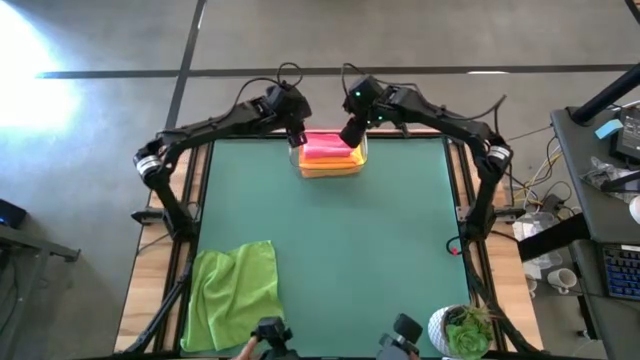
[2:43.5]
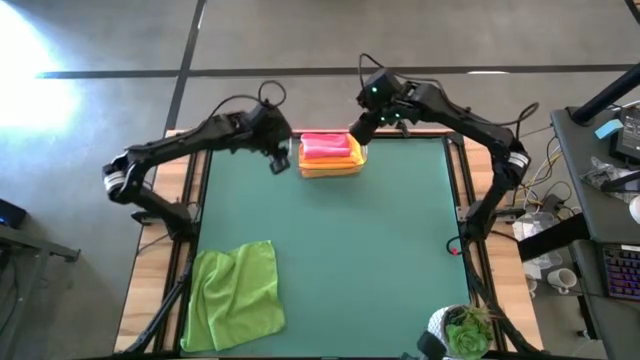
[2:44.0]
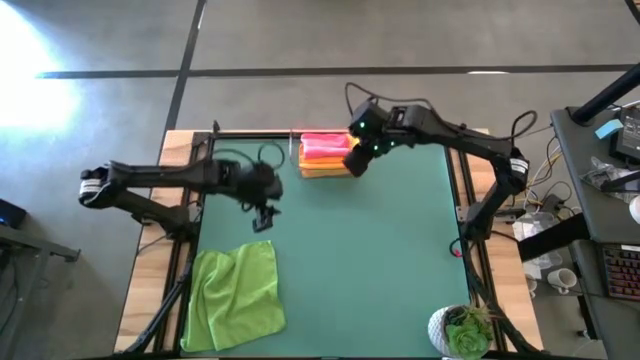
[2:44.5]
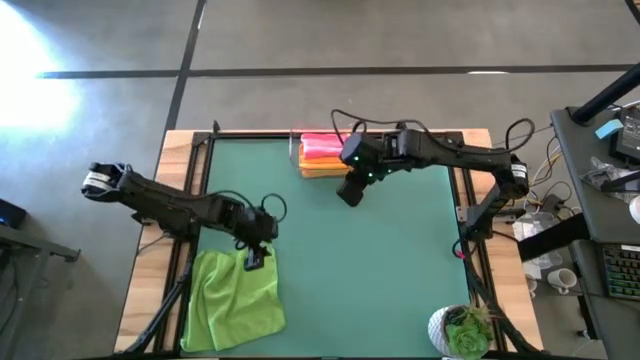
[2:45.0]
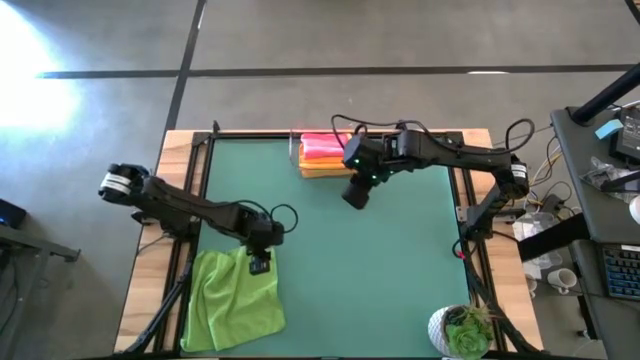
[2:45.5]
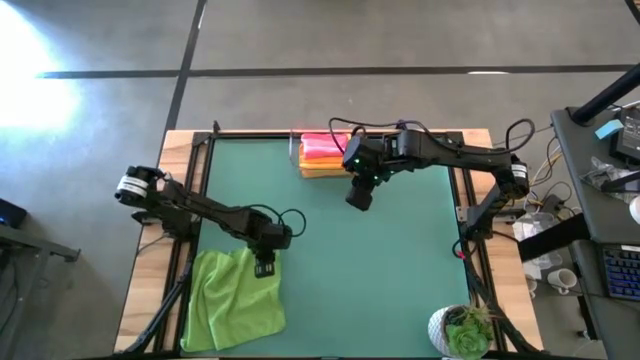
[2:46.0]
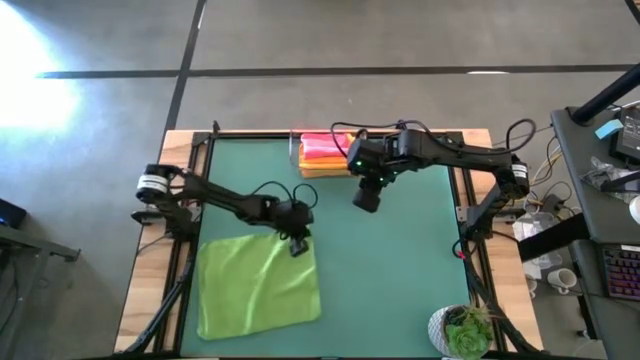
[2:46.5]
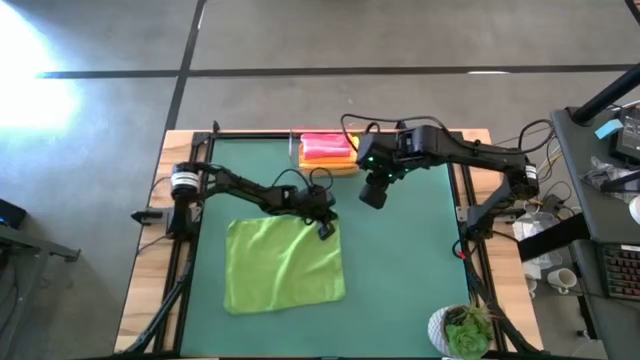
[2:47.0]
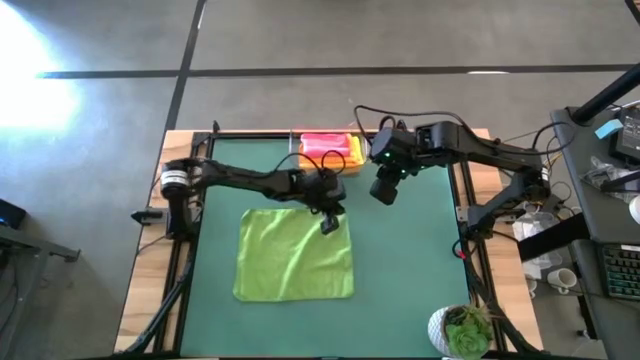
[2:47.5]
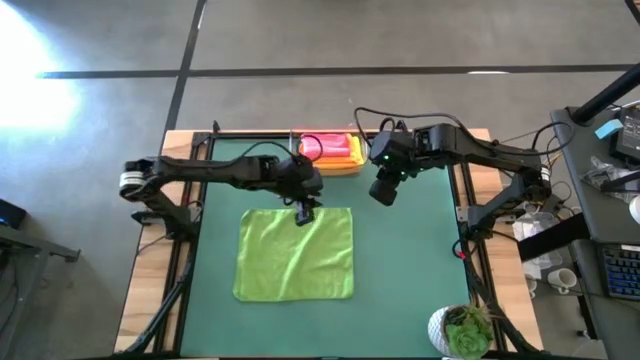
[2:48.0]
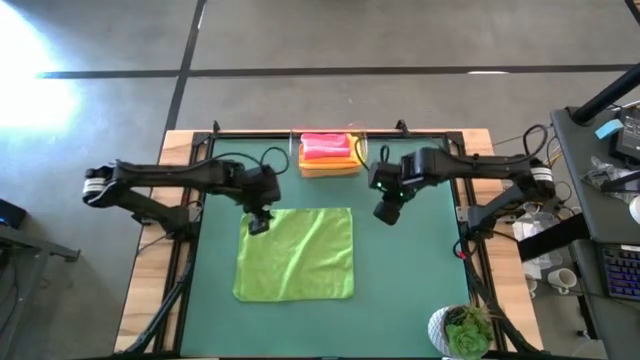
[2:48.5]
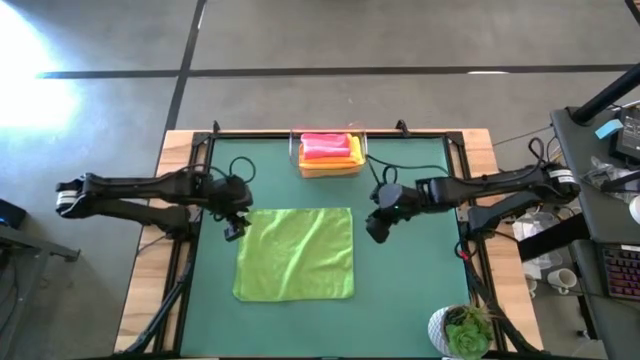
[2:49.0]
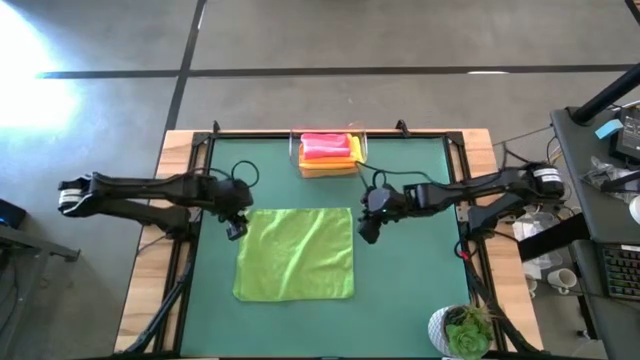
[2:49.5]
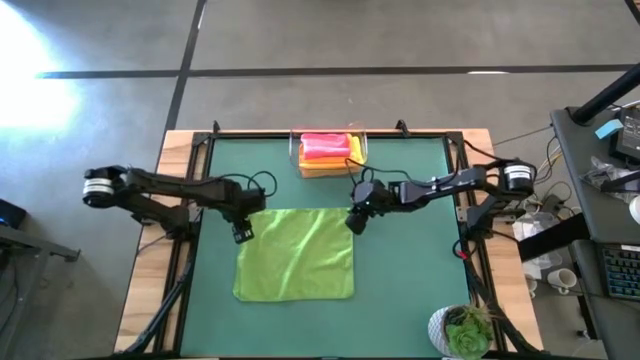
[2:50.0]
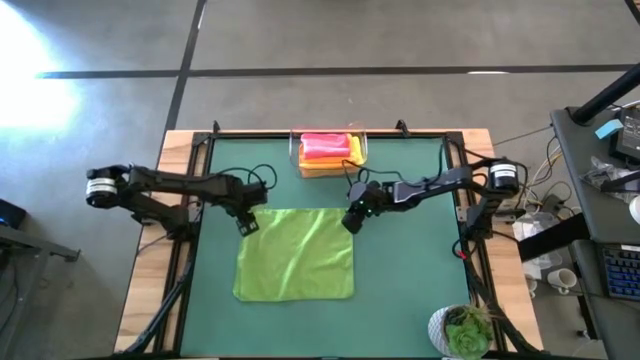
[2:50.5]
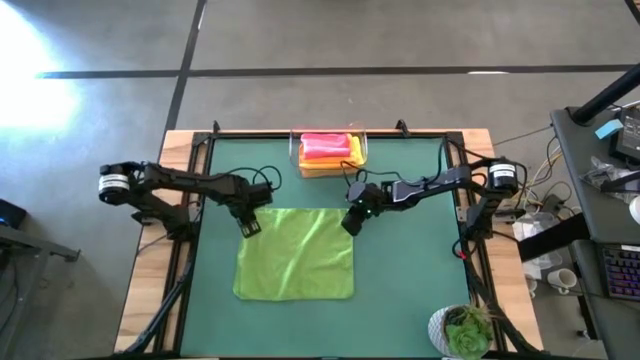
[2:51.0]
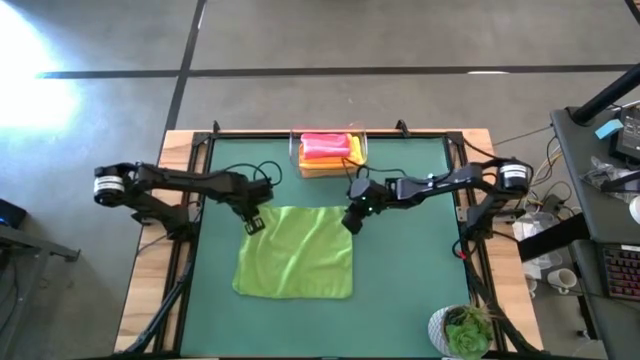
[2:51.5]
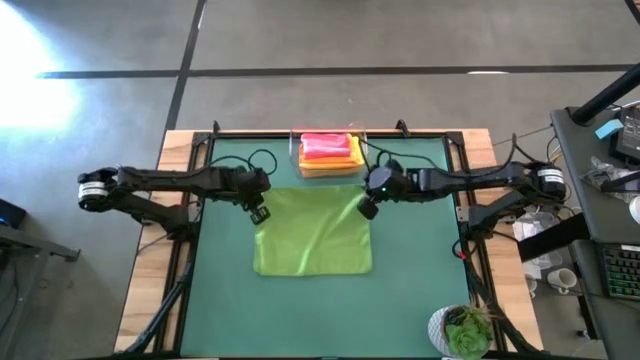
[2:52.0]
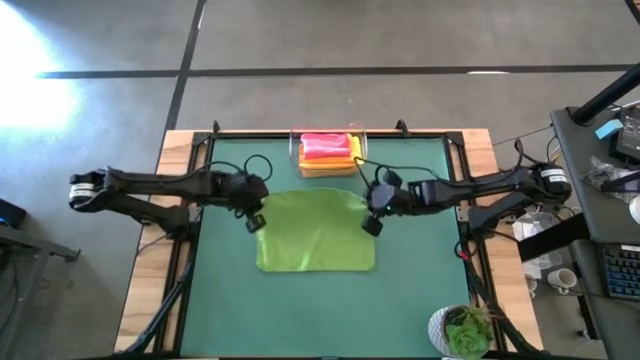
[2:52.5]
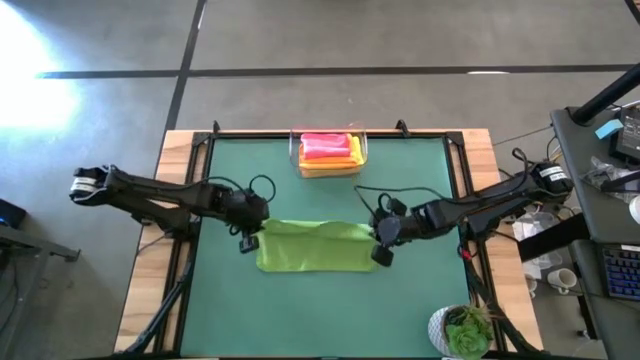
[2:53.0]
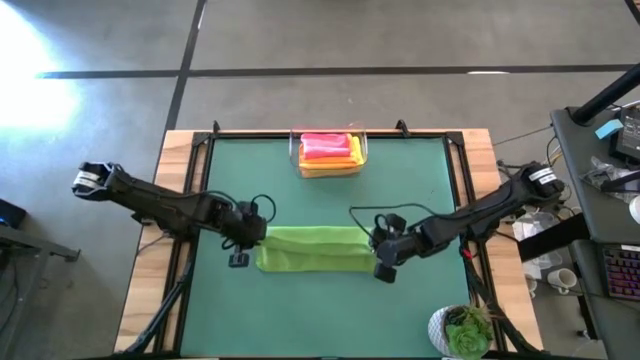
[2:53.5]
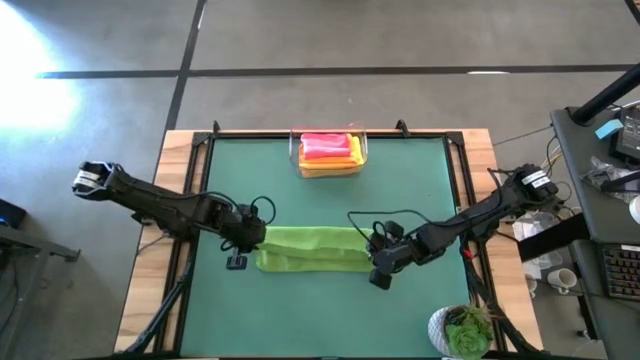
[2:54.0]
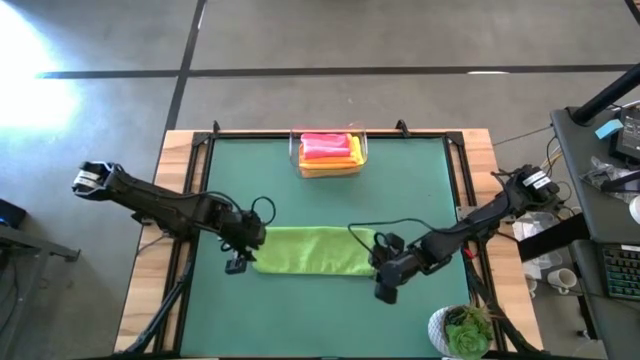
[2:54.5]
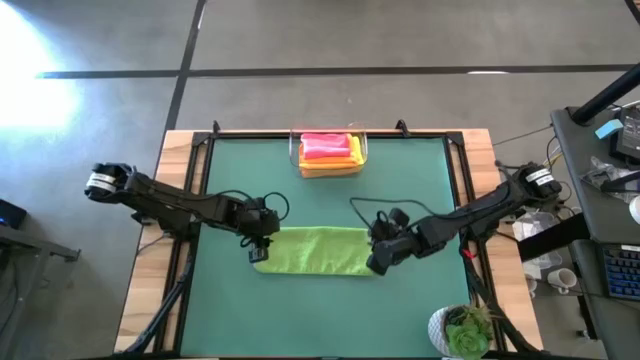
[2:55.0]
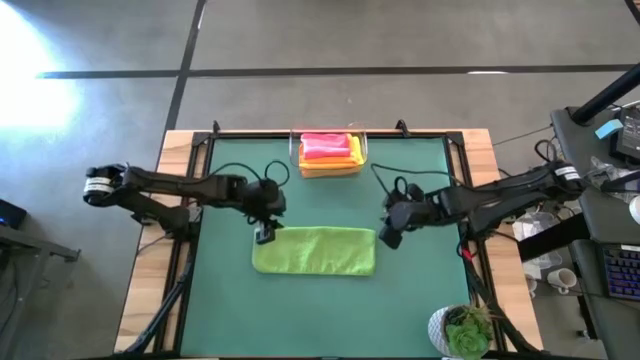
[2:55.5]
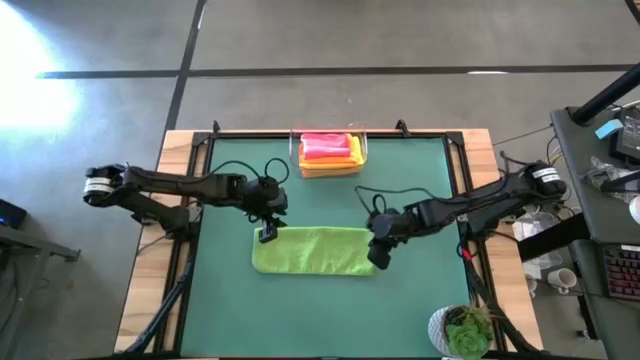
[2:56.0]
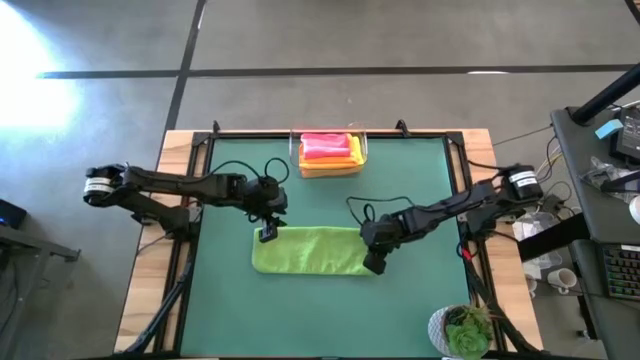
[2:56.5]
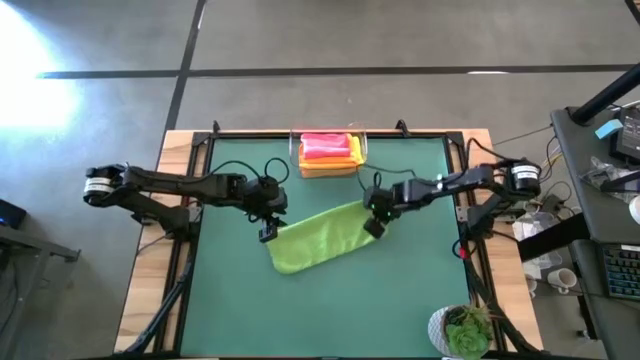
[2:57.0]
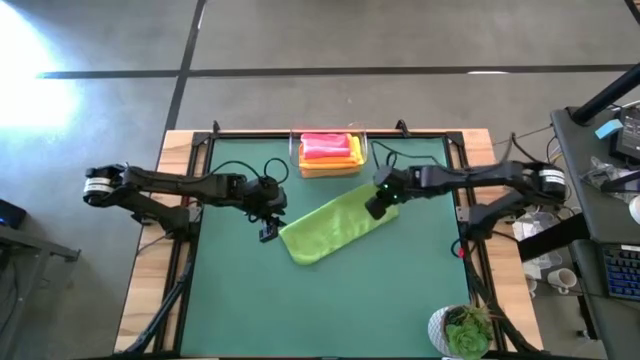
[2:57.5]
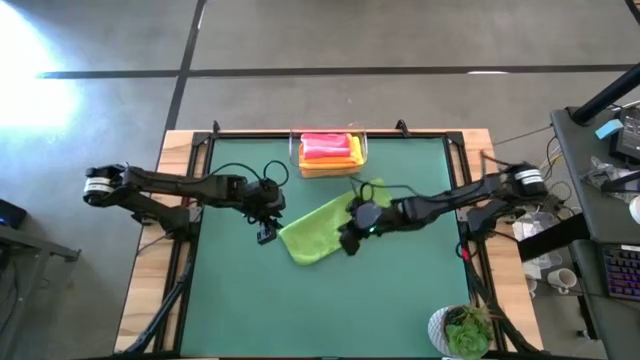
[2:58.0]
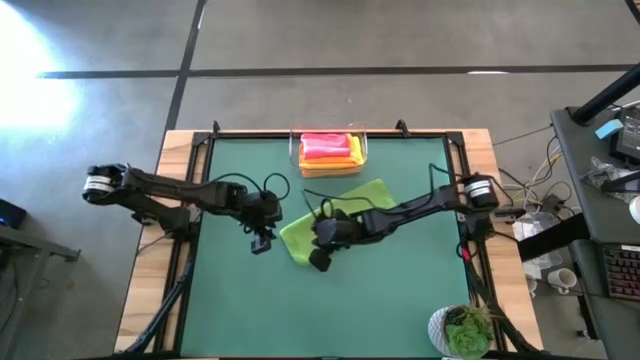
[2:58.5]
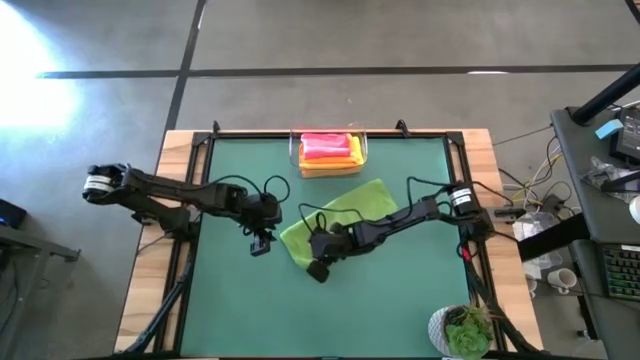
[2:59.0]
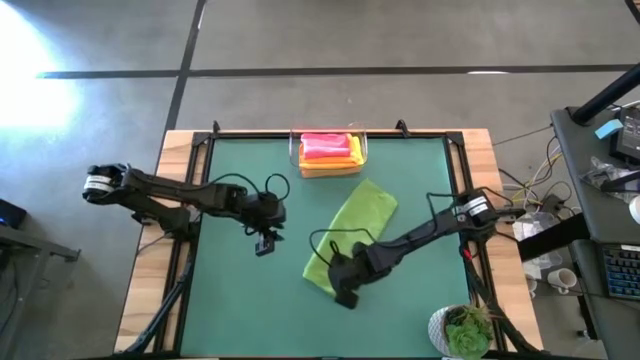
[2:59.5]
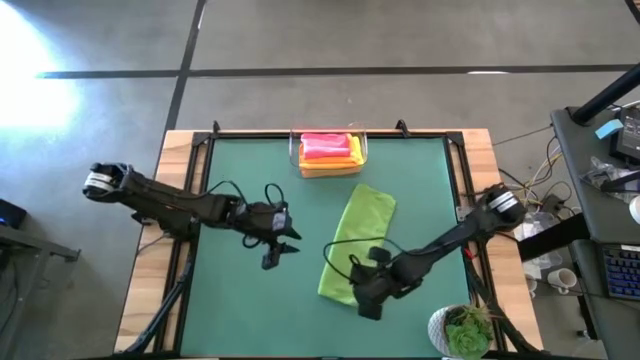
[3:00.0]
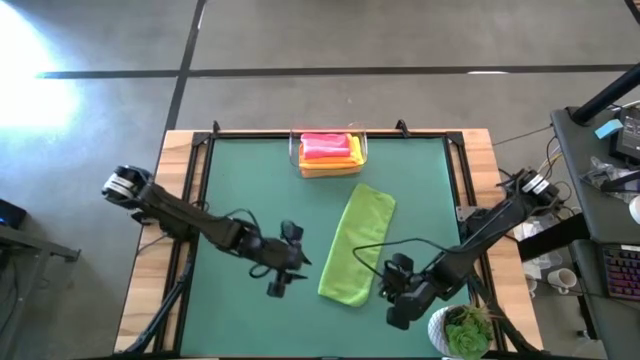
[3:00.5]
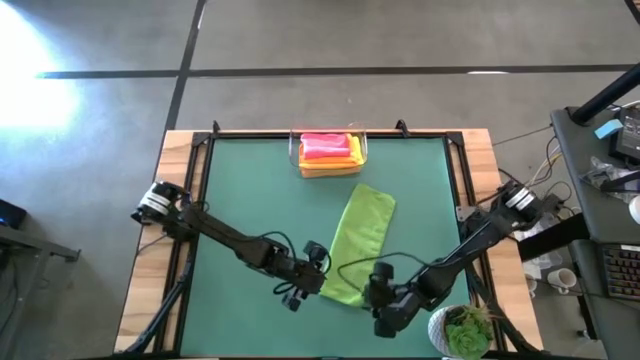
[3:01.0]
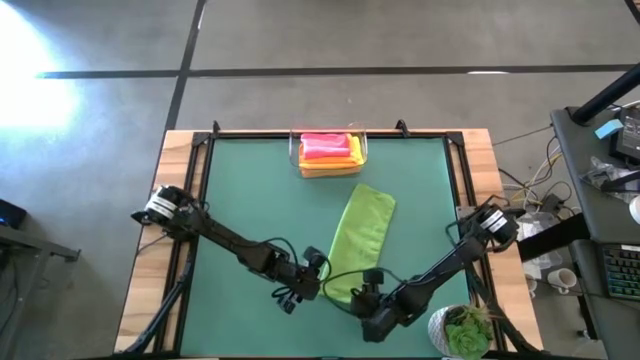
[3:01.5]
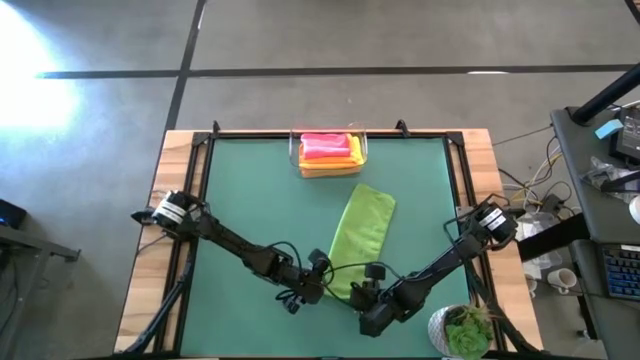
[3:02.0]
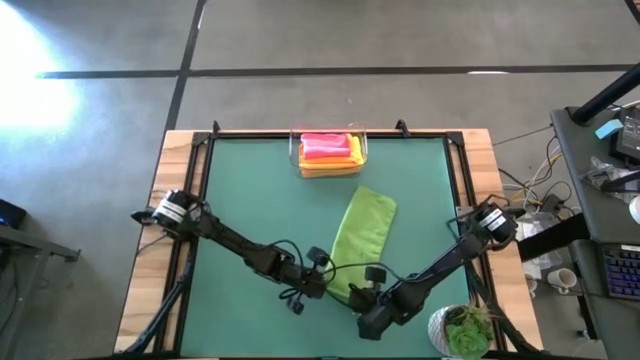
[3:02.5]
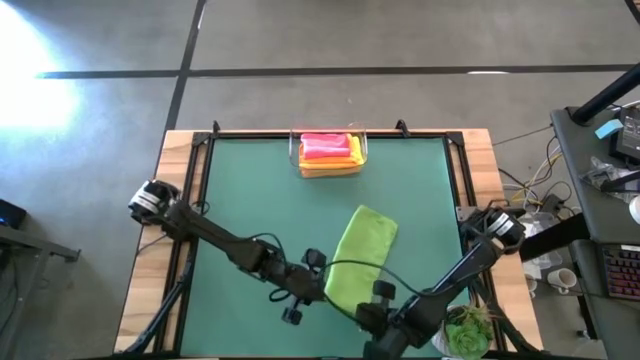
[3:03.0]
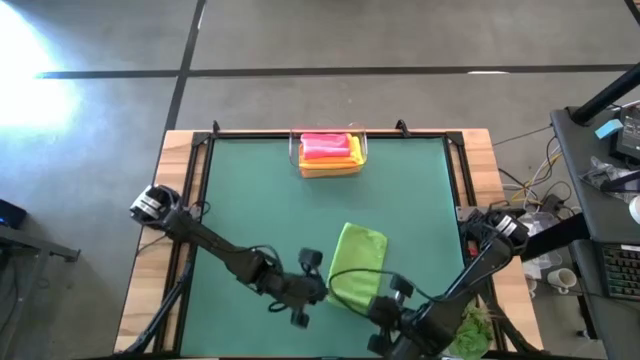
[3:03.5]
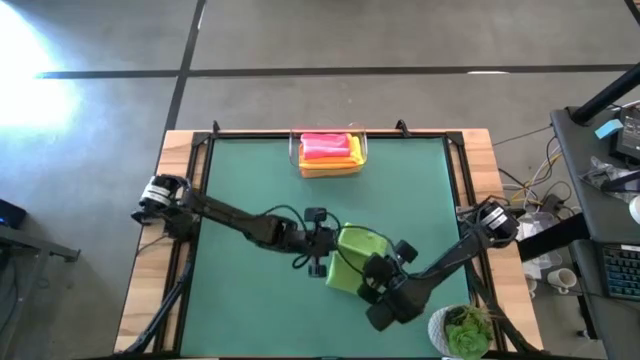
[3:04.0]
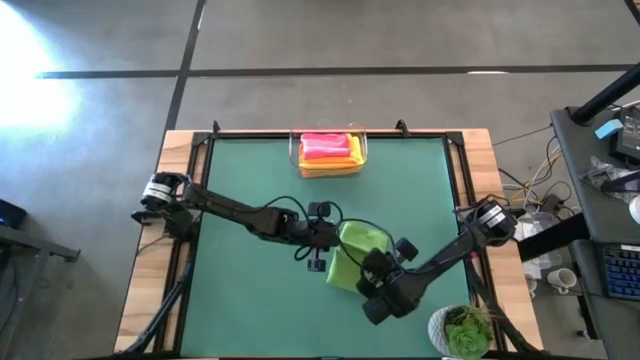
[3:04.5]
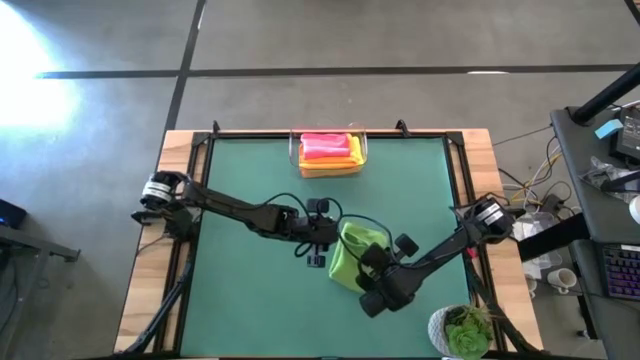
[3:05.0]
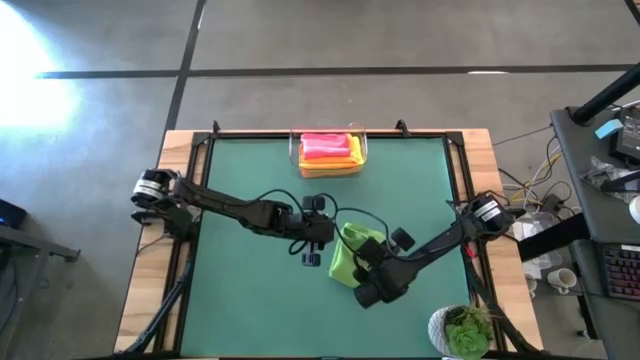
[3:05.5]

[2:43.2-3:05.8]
Task: Fold microfiber towels
Fold the green microfiber towel
